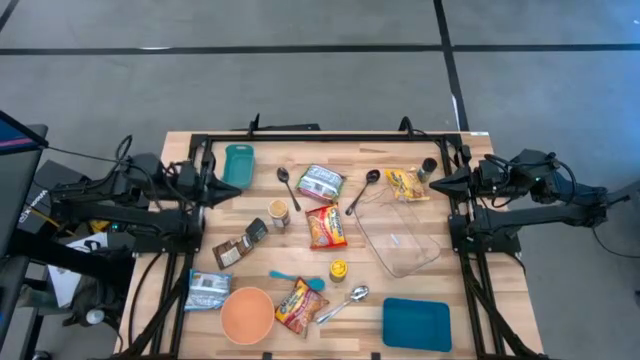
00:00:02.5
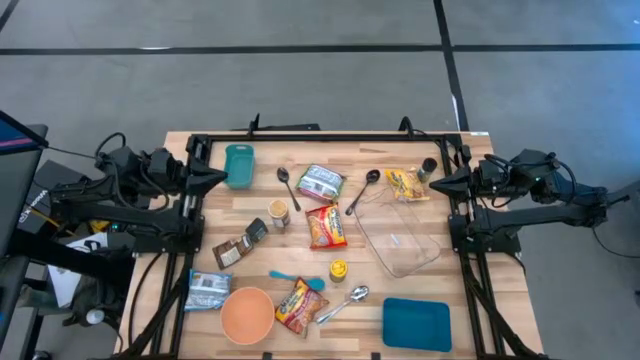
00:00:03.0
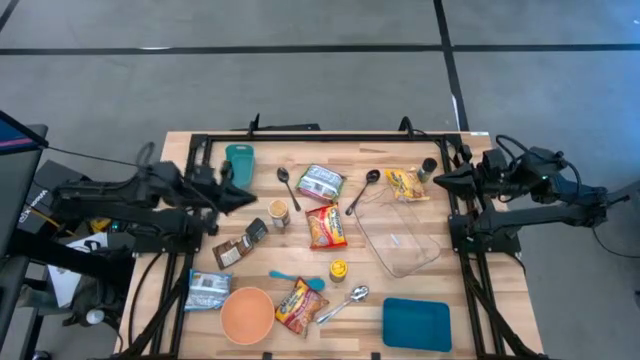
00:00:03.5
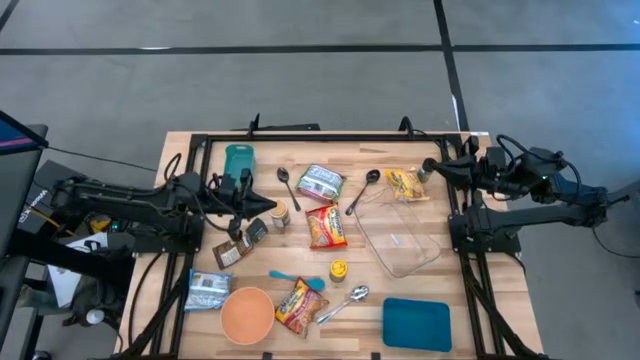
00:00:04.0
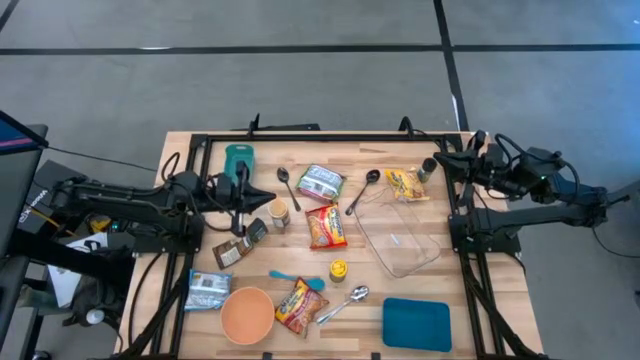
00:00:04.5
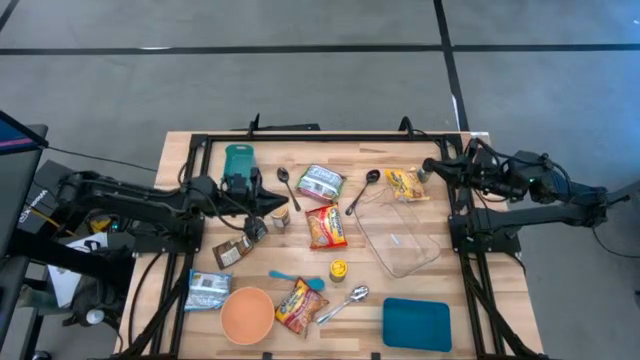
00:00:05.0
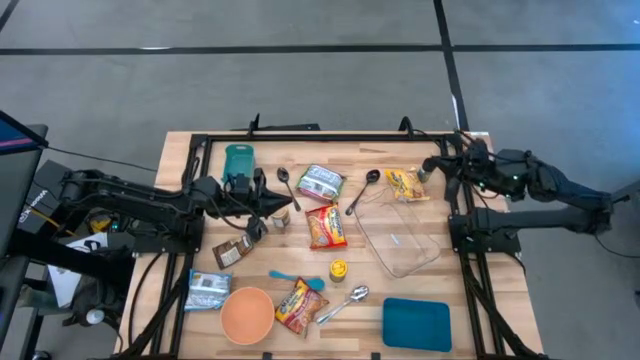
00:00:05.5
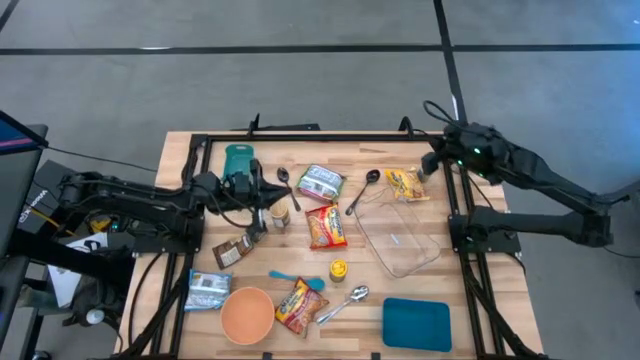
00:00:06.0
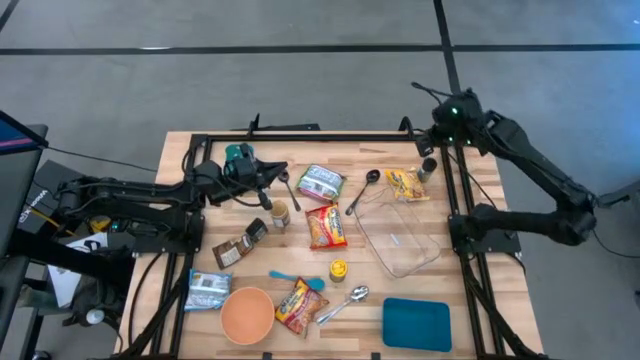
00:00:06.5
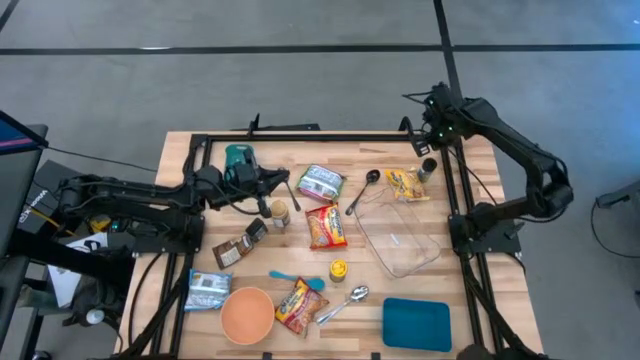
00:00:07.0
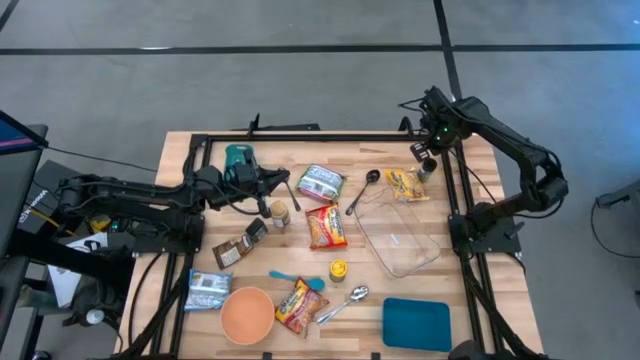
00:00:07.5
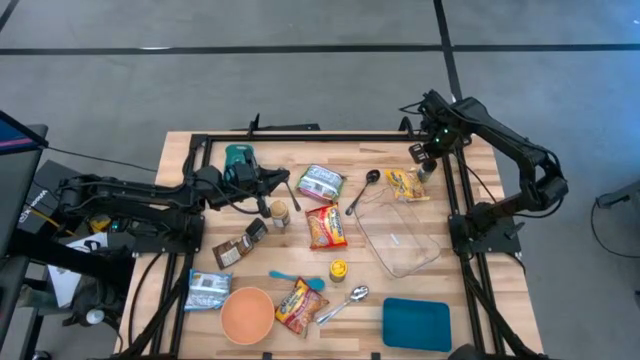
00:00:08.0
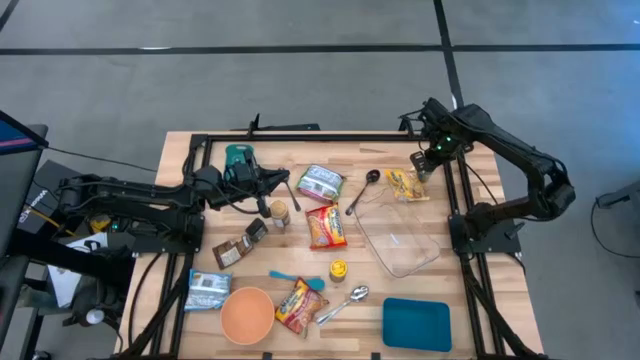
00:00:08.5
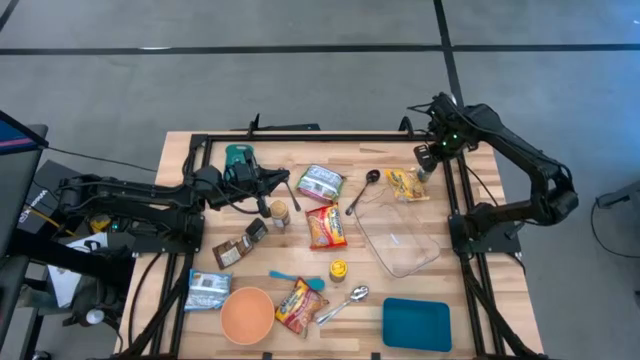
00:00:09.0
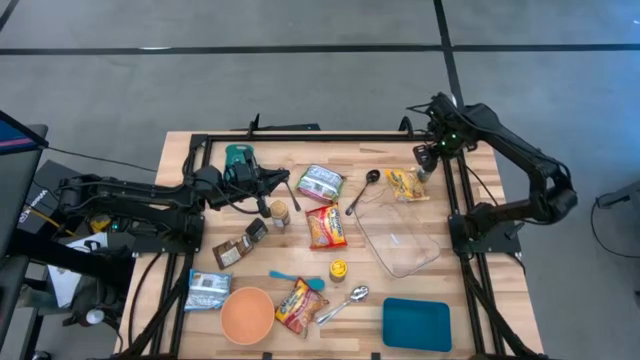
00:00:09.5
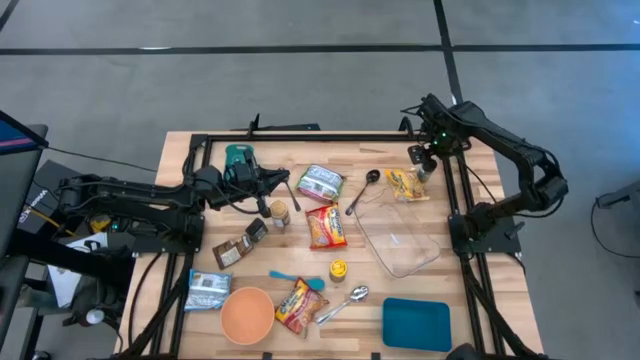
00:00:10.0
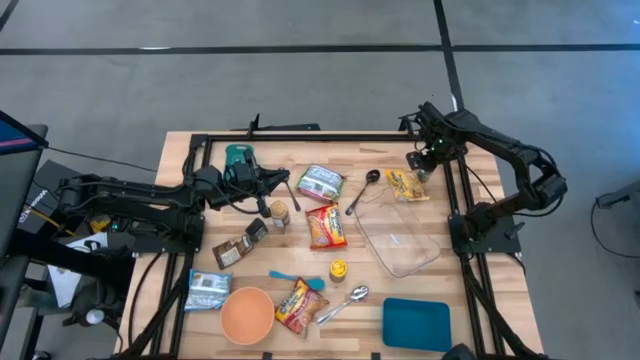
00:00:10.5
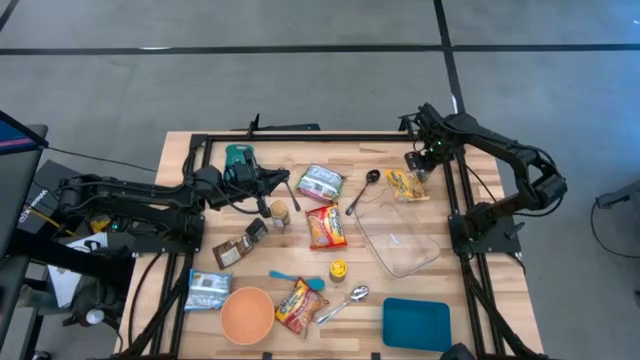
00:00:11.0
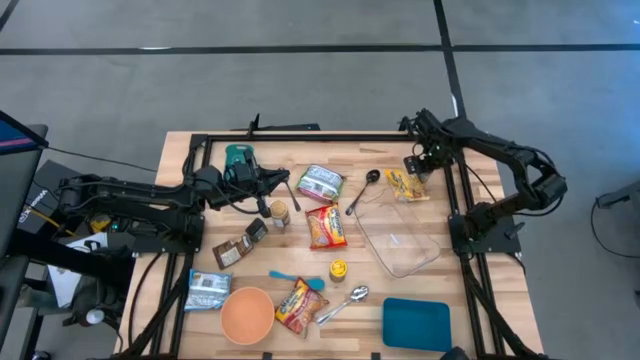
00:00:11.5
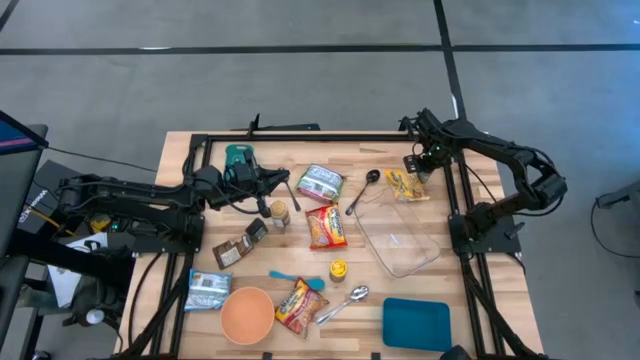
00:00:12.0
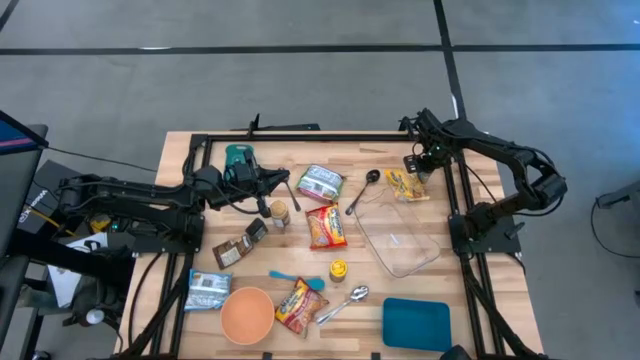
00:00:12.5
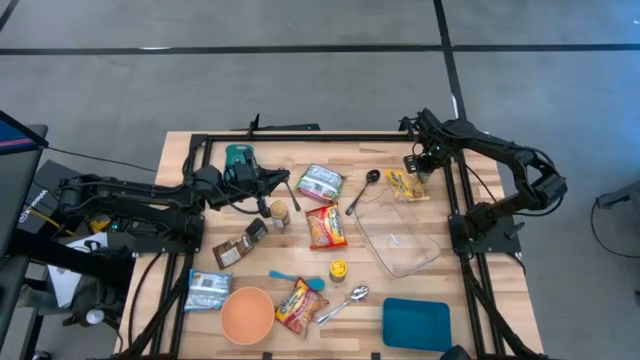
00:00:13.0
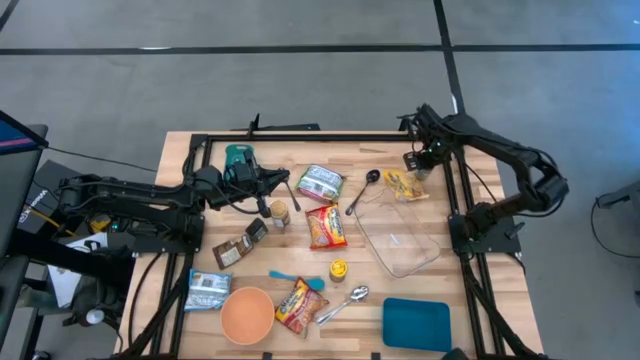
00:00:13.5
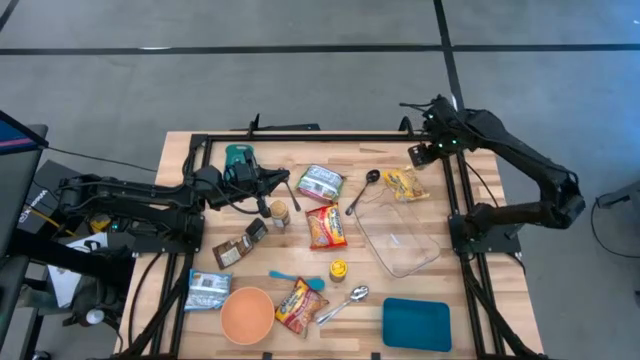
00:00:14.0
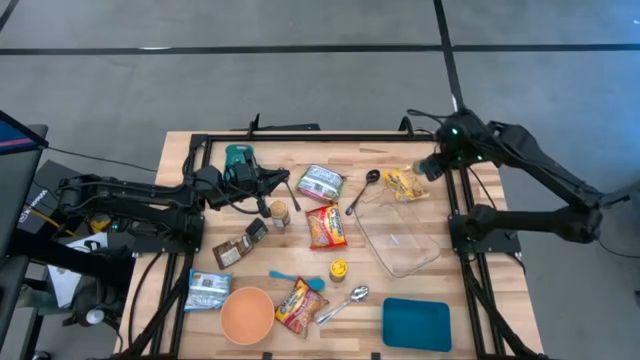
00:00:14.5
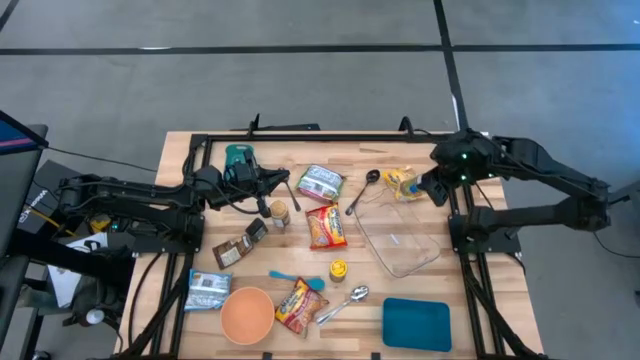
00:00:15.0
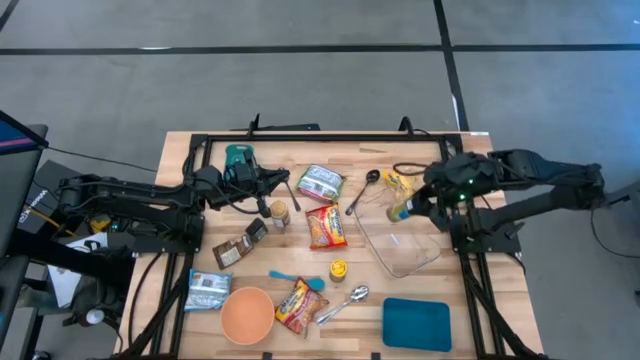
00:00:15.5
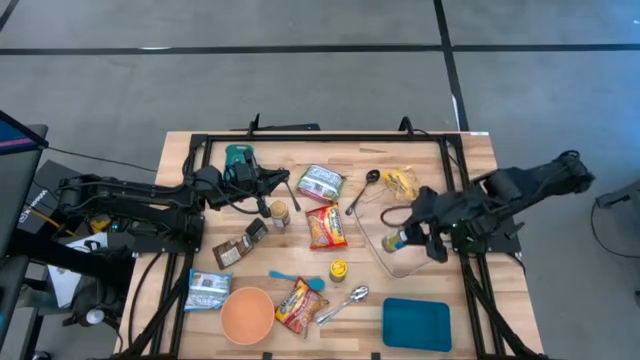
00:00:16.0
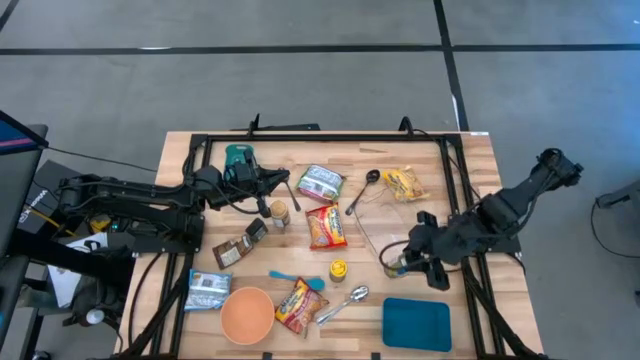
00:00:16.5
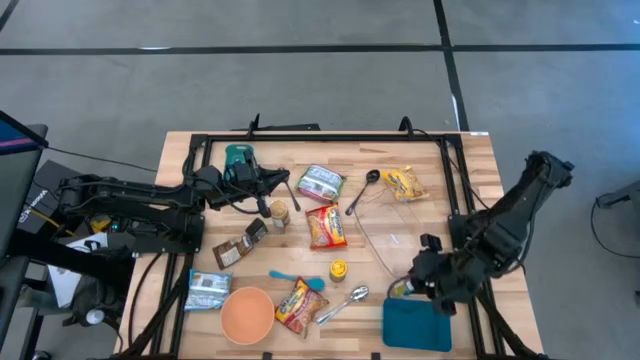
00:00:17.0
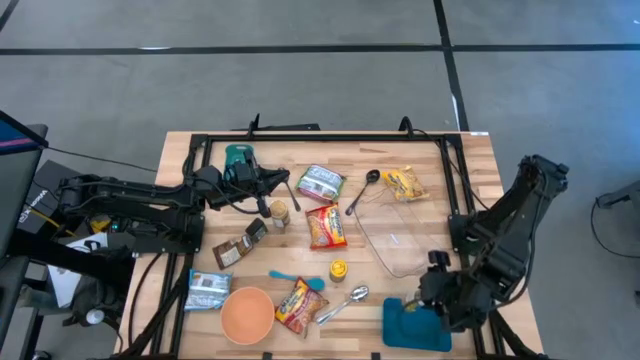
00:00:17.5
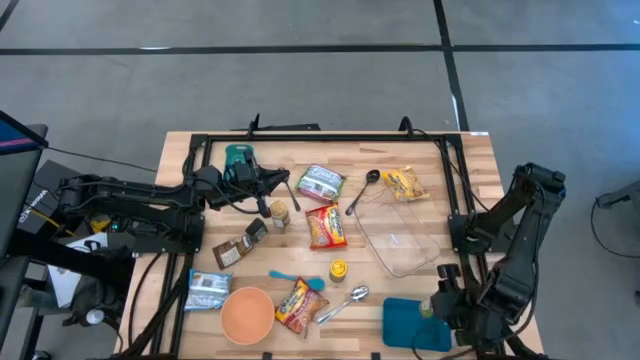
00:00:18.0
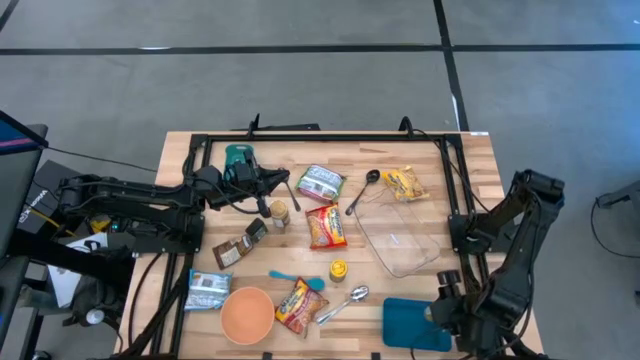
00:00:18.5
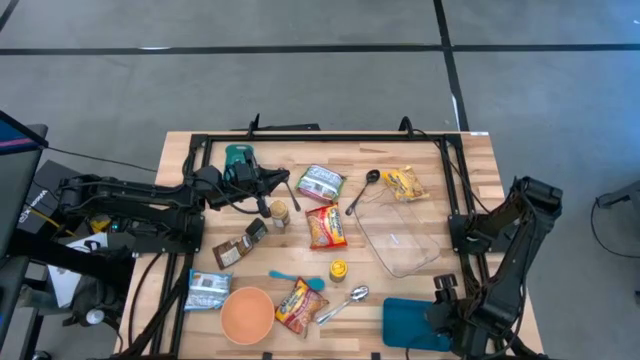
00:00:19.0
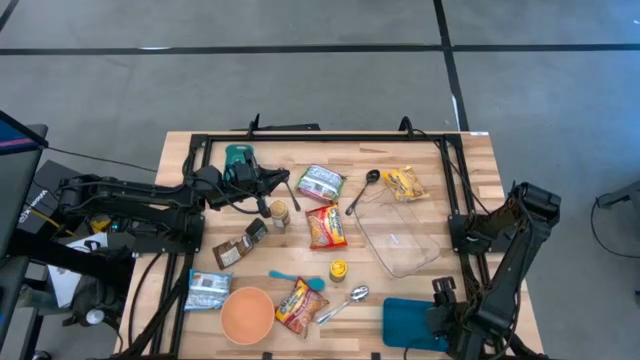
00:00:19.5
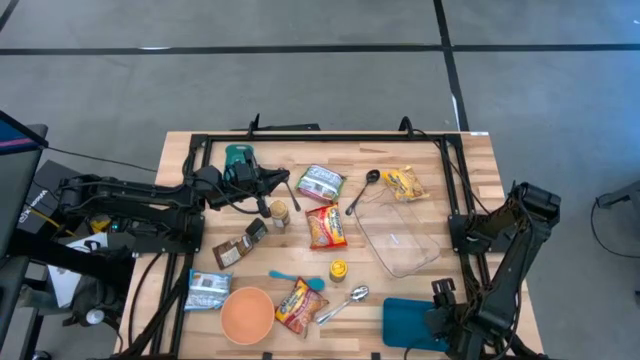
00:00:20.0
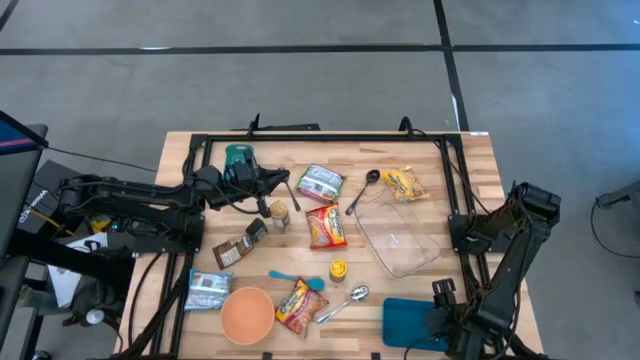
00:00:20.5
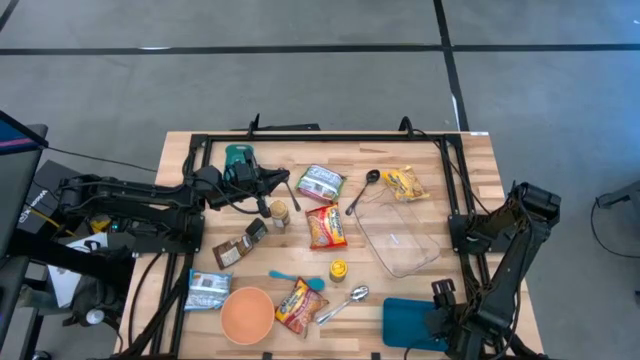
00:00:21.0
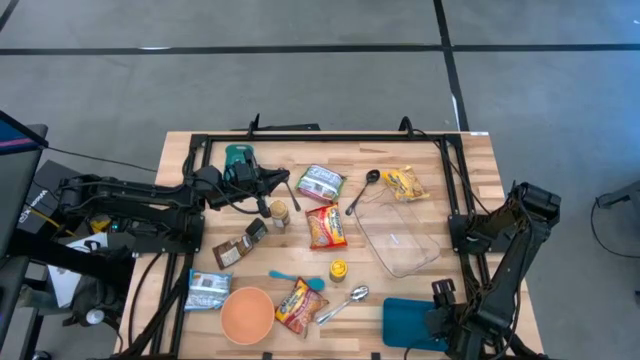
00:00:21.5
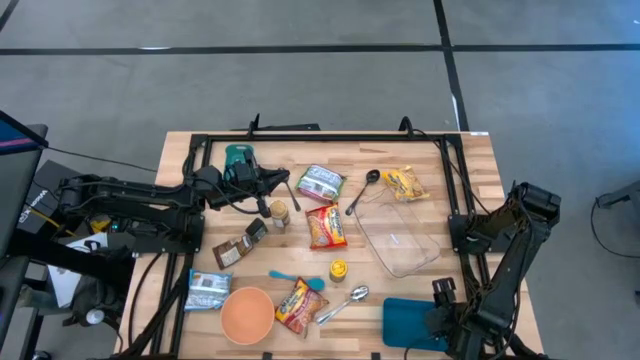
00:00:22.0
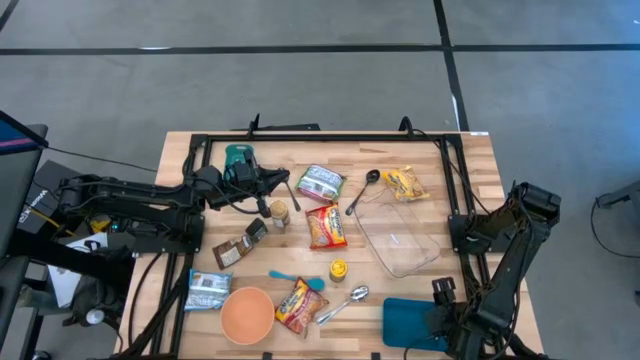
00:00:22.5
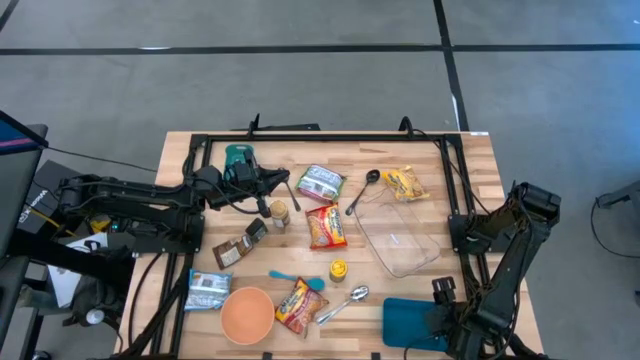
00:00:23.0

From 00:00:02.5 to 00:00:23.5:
Task: Pick & Place Food Item
Put the black spice bottle into the blue bin
